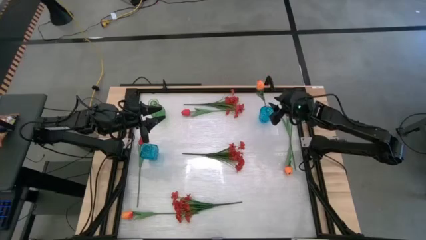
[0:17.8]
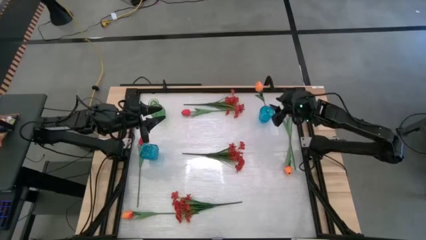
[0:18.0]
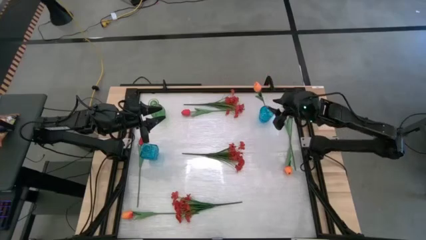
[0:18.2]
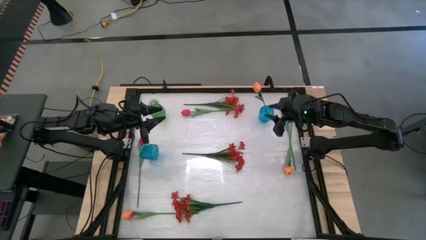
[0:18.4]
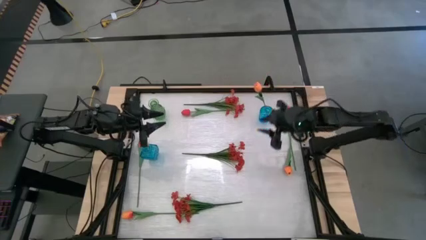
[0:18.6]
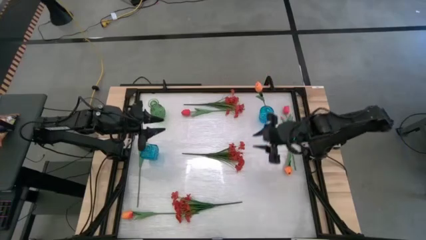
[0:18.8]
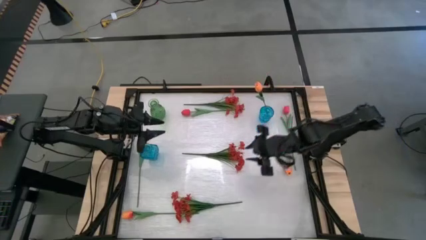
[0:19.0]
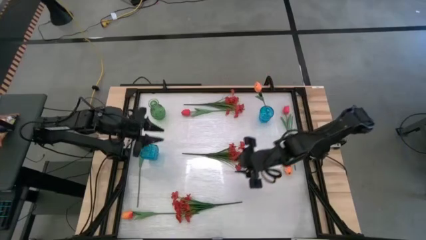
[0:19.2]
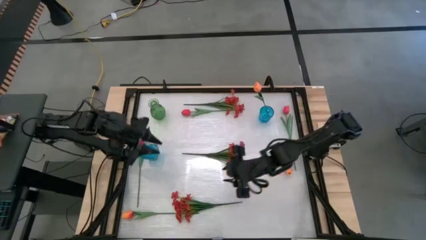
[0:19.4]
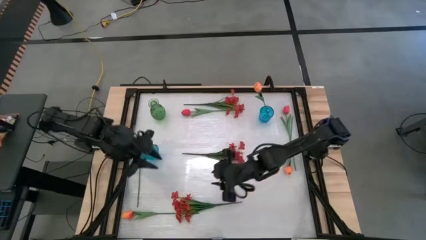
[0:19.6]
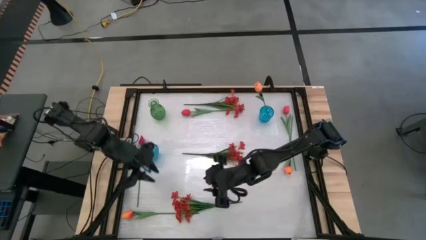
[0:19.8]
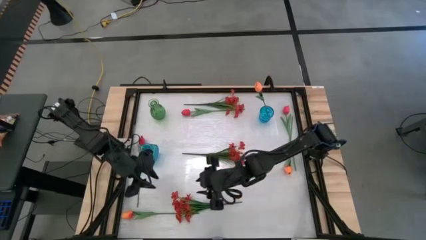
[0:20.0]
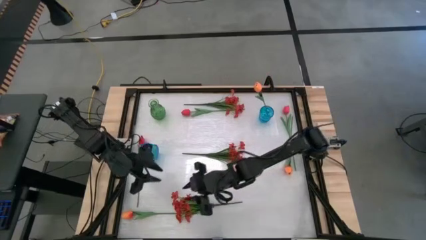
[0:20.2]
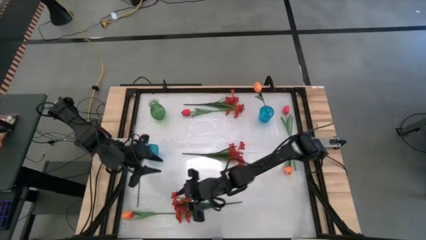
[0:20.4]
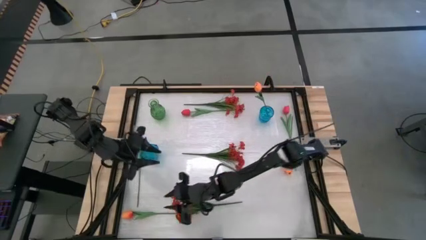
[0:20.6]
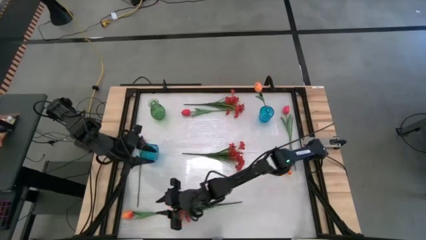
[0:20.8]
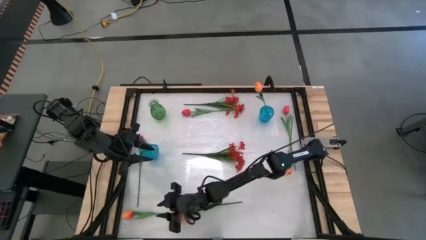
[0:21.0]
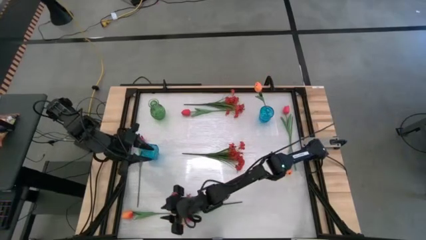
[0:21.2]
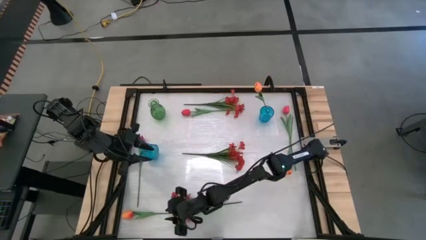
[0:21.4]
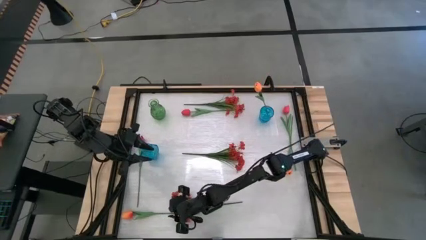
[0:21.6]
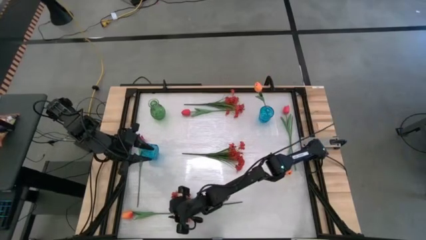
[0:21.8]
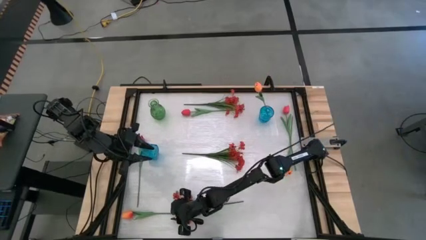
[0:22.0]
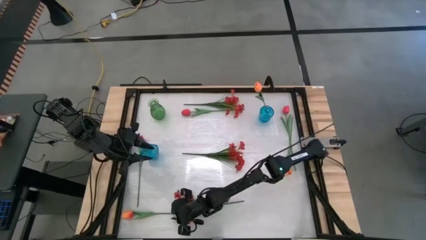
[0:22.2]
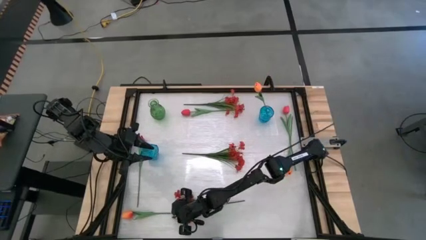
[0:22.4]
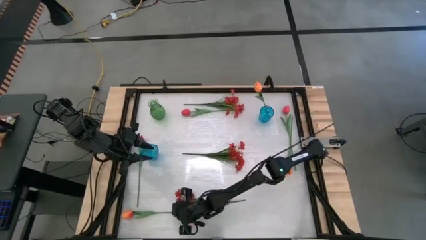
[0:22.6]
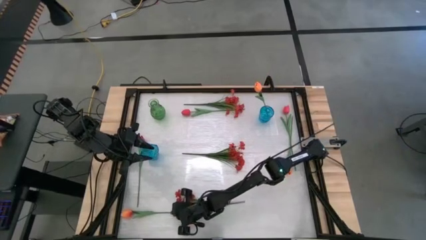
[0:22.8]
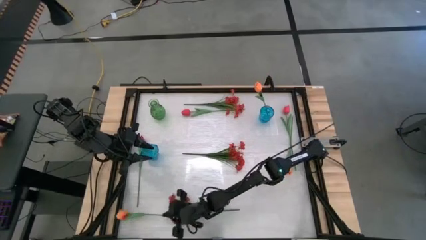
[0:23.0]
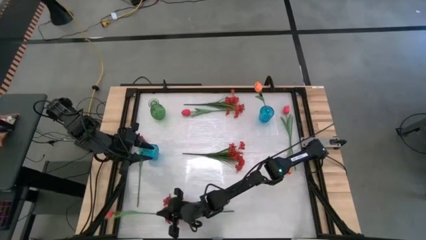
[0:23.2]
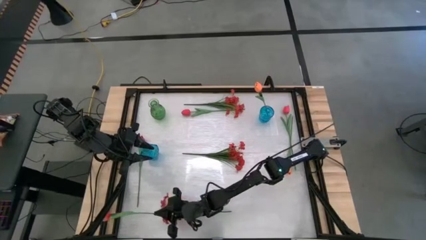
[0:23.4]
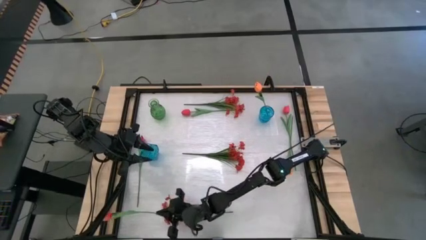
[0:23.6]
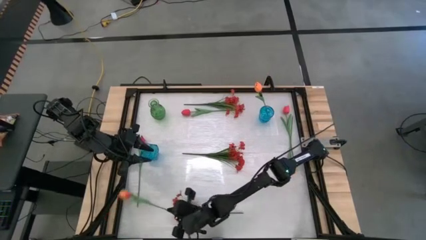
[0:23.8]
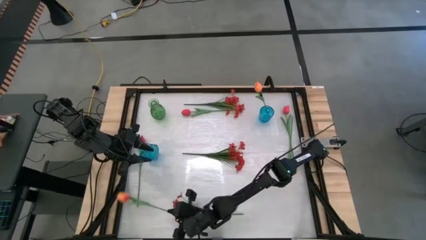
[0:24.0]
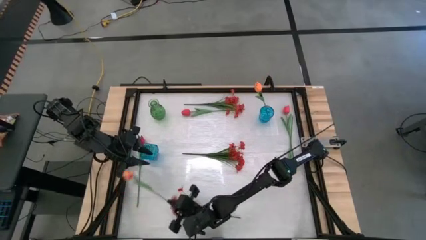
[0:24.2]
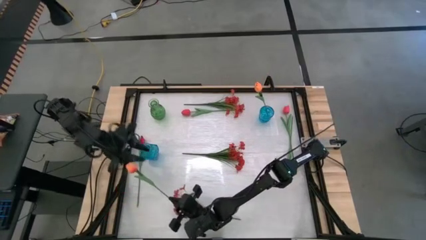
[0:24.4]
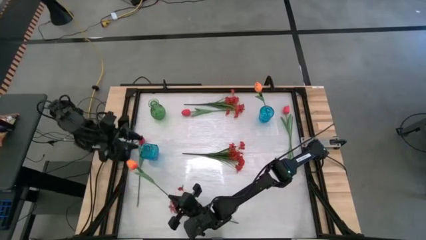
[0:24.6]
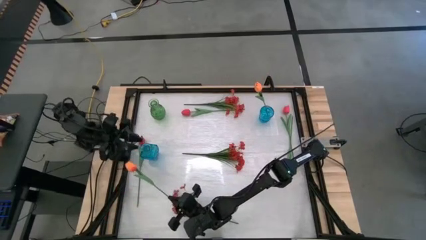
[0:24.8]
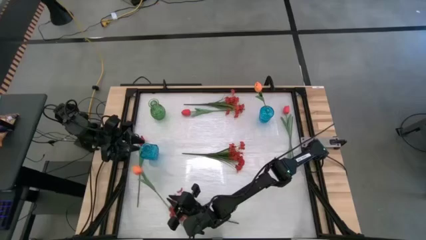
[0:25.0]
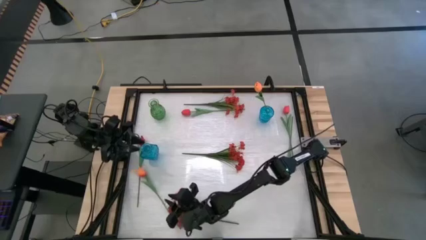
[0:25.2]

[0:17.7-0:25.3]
Task: Sort flowers into vase by color
Put the left orange tulip into the right blue vase
